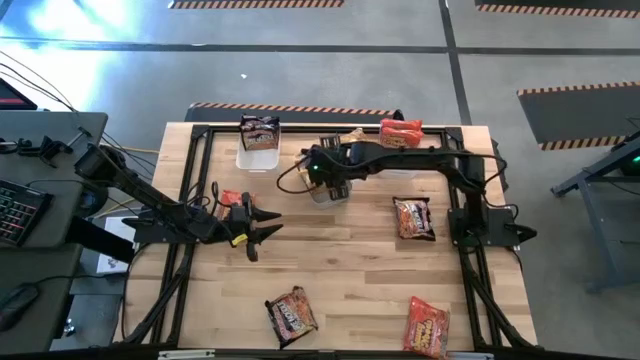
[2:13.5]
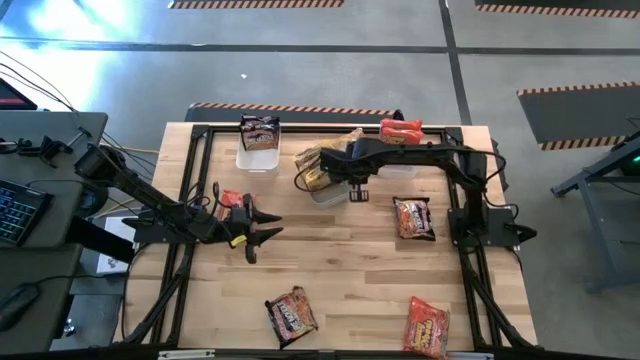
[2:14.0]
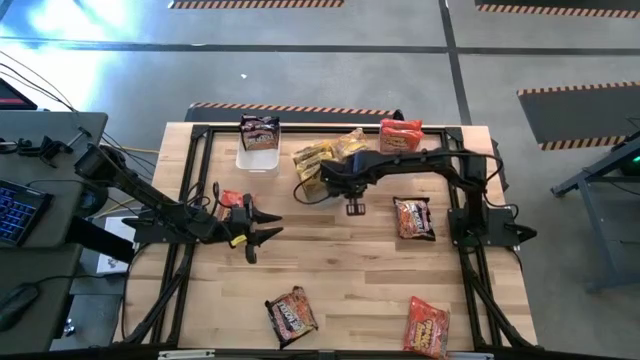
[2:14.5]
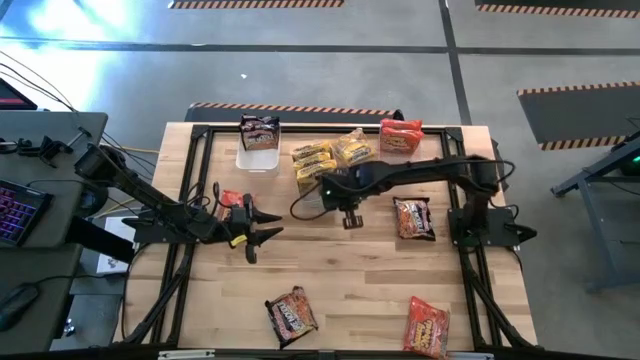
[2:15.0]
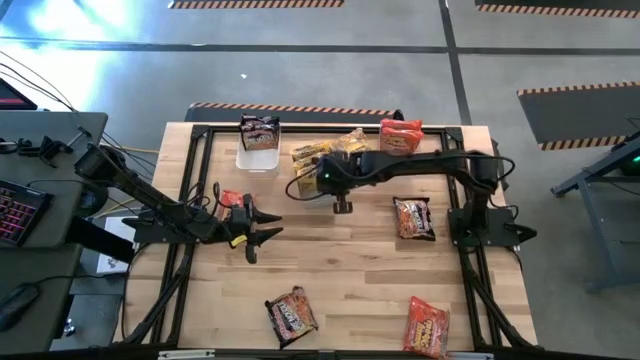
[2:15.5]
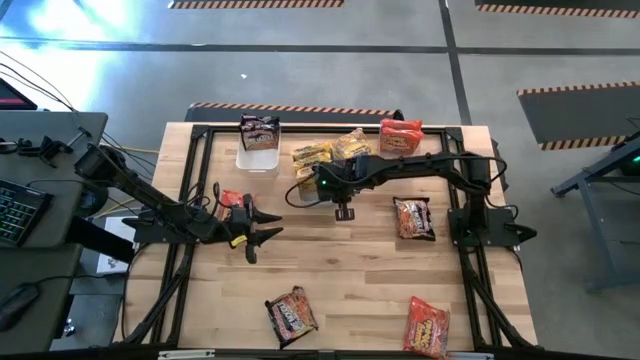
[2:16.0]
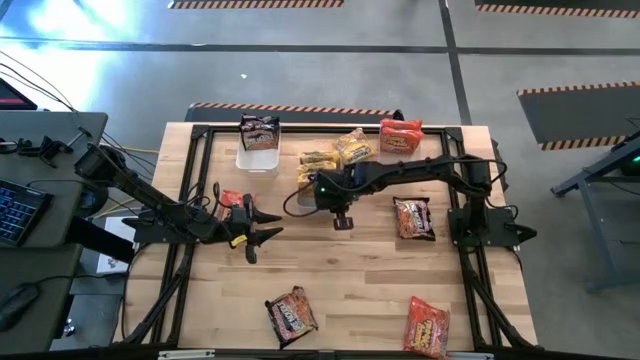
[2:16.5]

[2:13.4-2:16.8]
Task: Sort Maruchan noodles
Adjust the gray bin

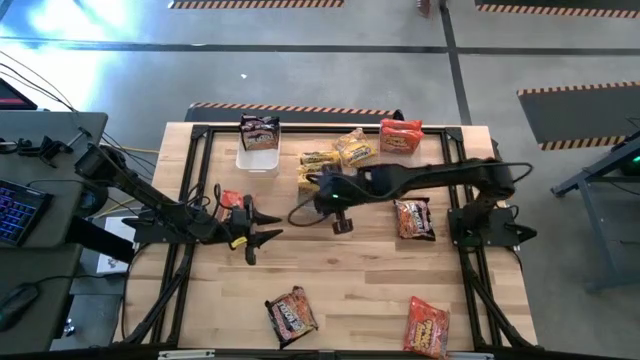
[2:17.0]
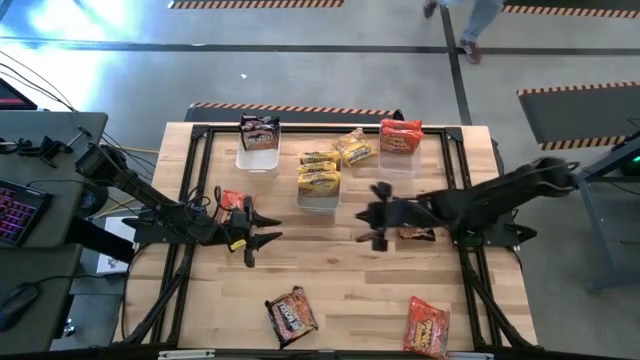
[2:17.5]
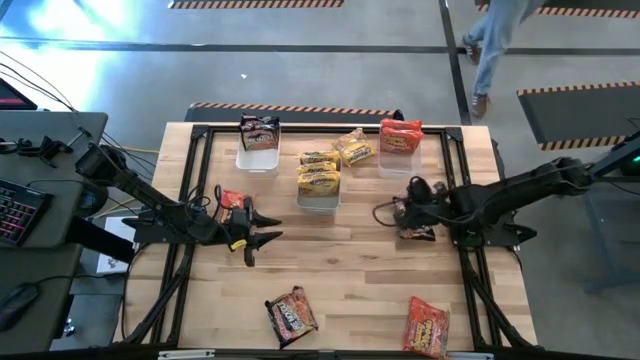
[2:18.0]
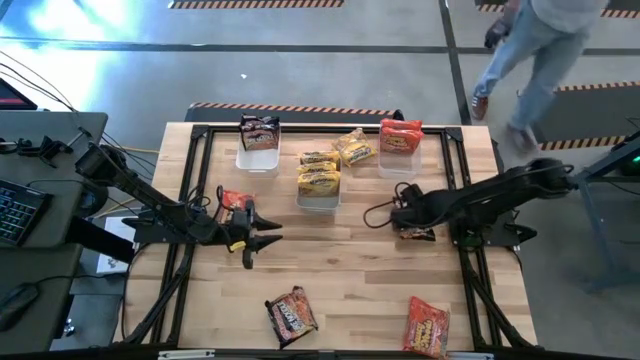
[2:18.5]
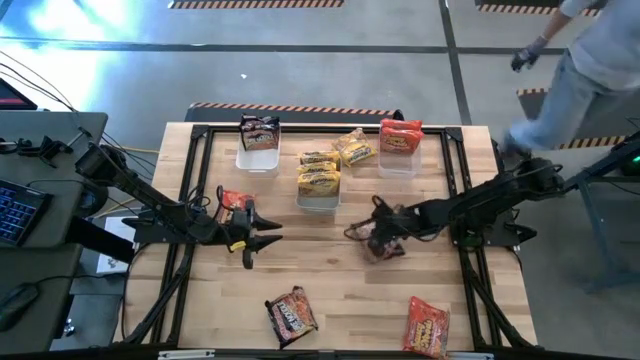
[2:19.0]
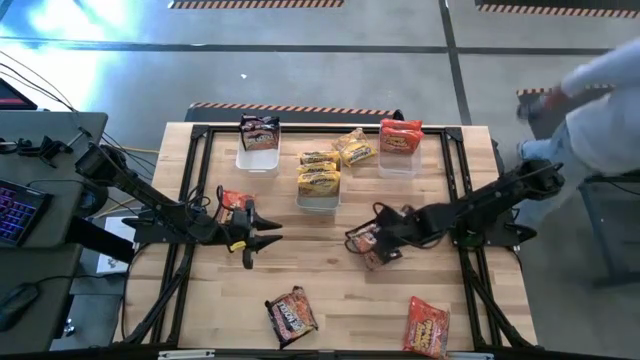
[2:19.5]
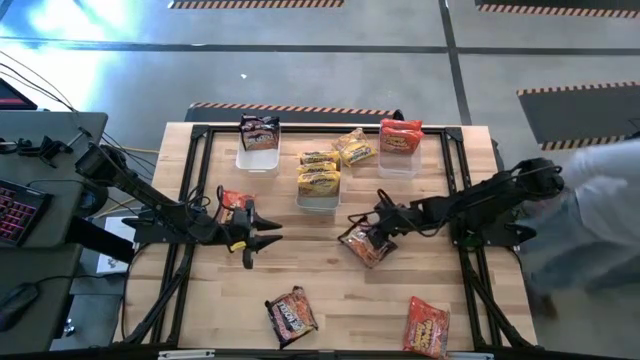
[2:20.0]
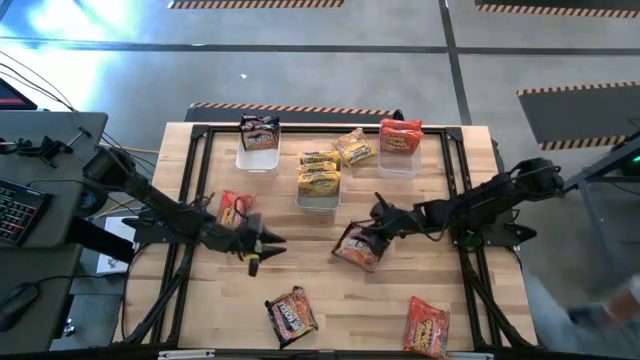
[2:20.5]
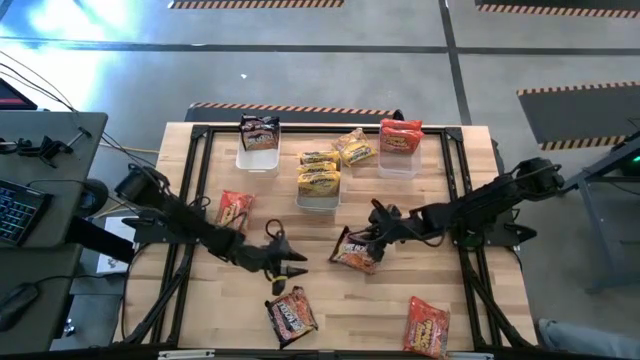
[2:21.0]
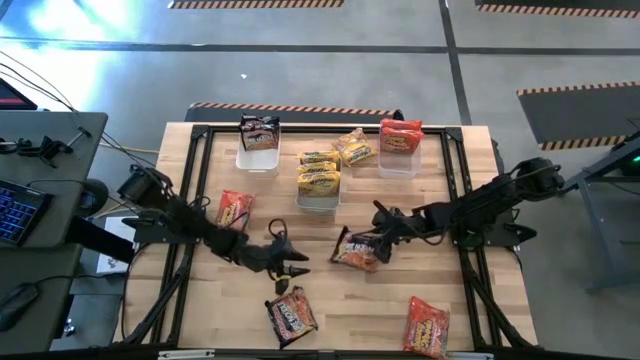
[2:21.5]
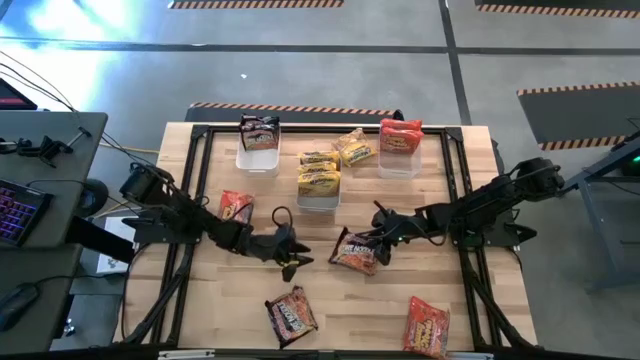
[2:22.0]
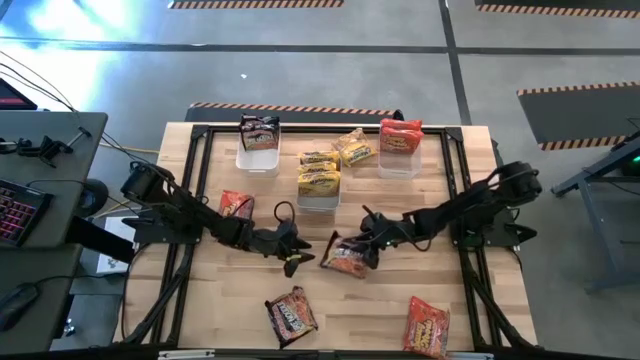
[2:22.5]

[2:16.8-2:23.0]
Put the top black noodle pack into the white bin

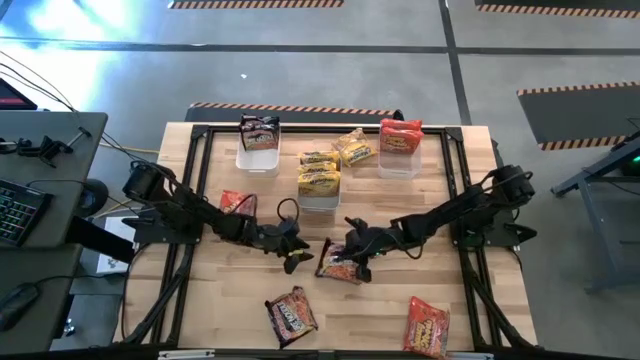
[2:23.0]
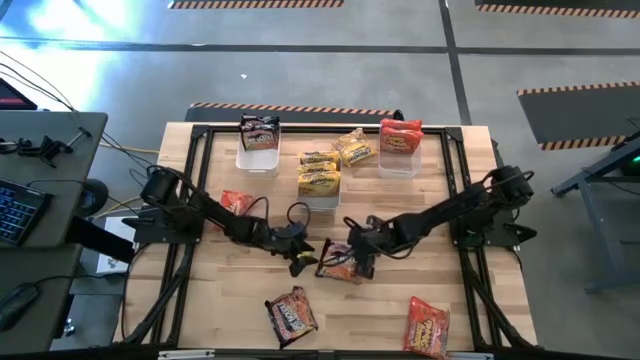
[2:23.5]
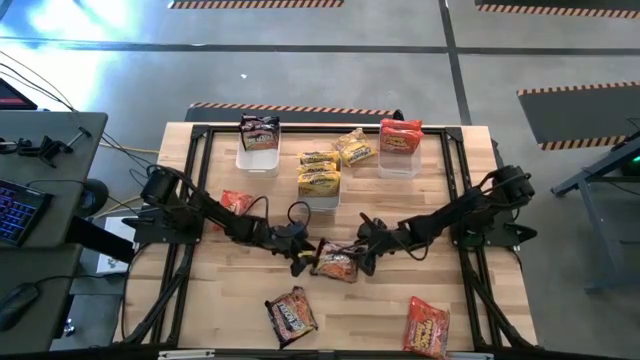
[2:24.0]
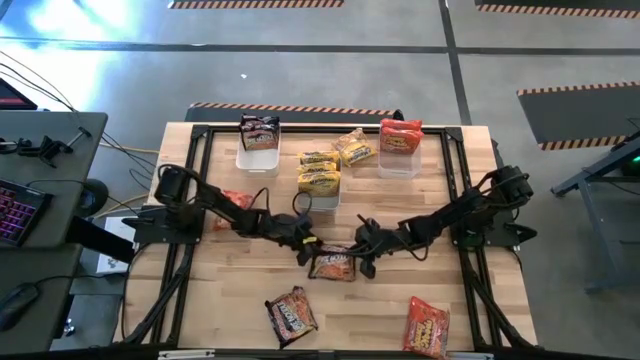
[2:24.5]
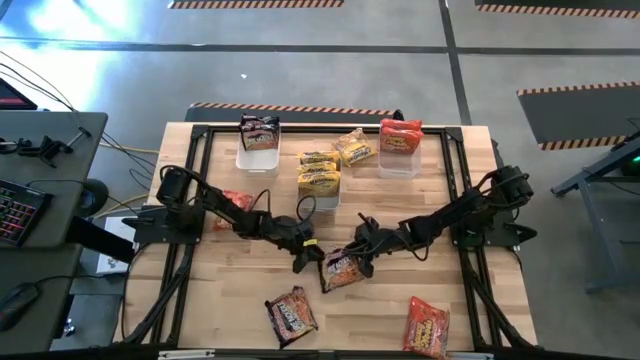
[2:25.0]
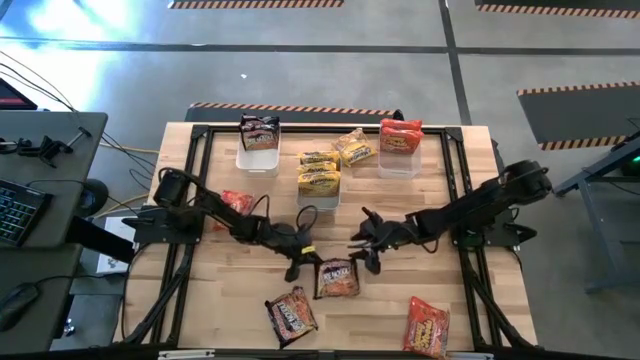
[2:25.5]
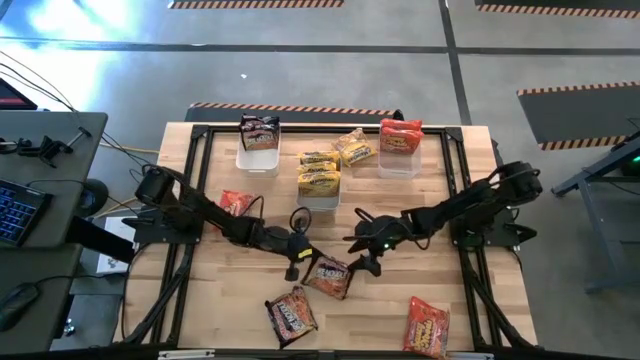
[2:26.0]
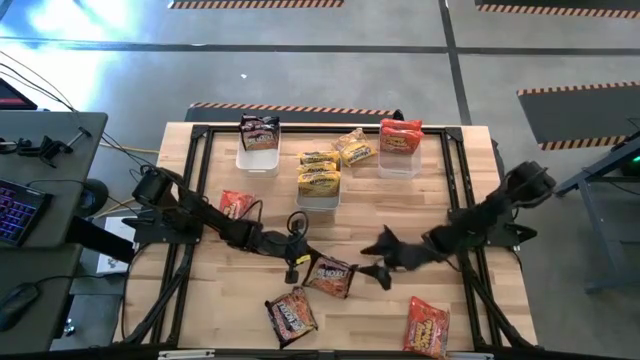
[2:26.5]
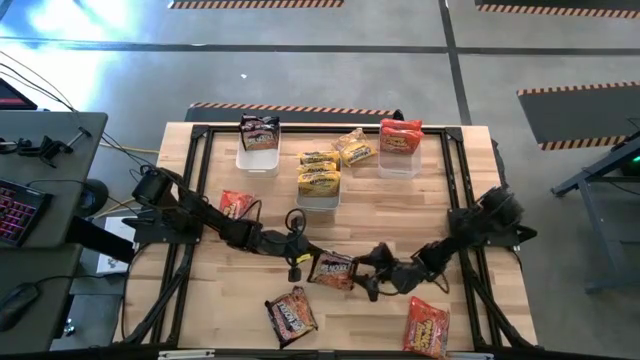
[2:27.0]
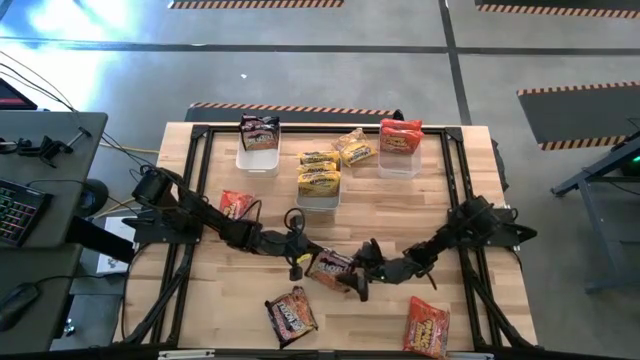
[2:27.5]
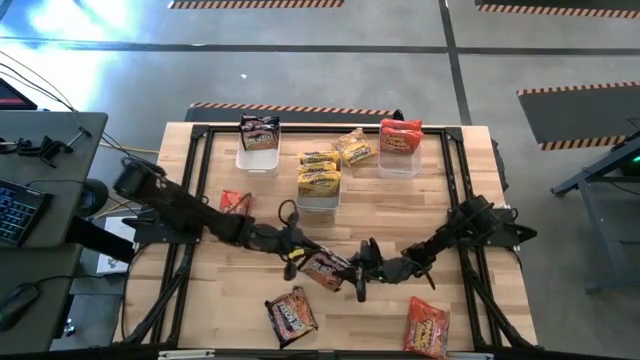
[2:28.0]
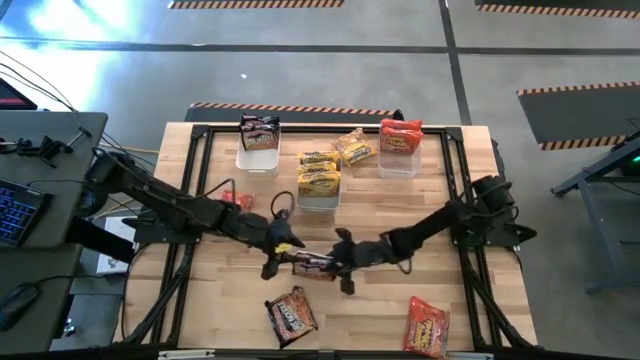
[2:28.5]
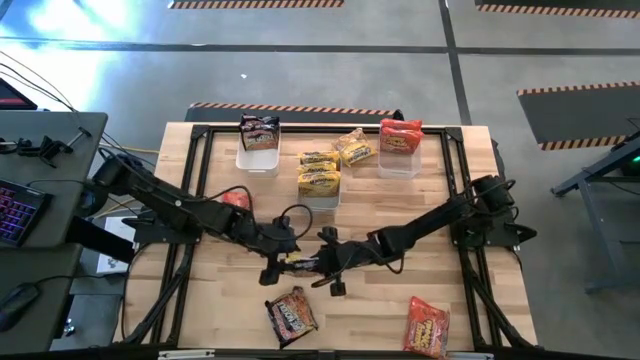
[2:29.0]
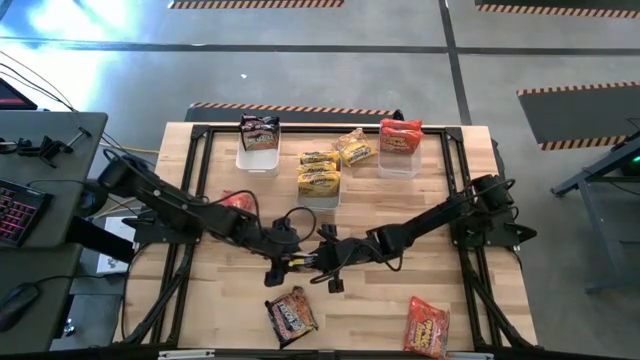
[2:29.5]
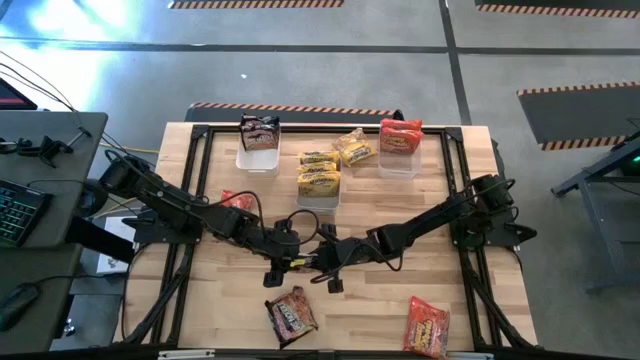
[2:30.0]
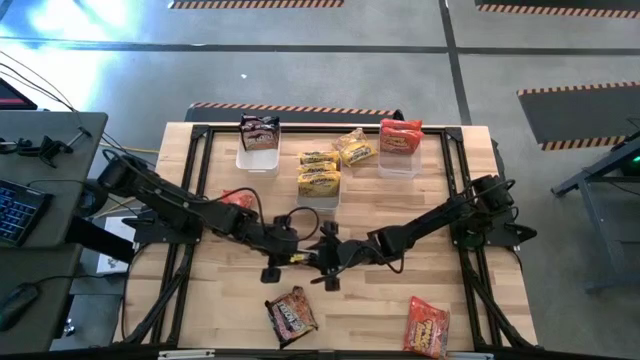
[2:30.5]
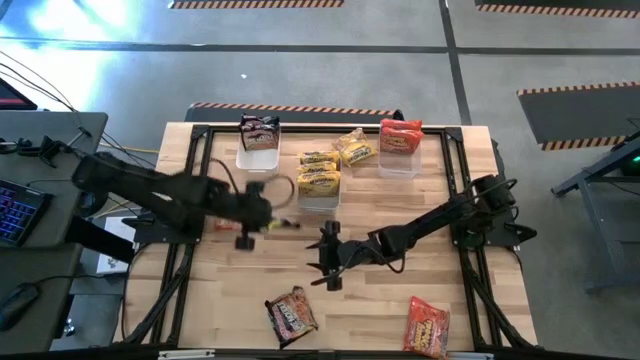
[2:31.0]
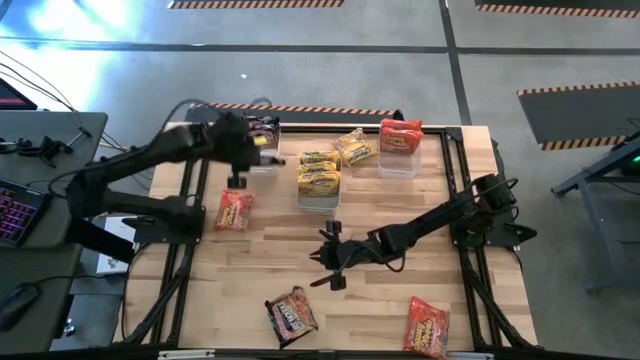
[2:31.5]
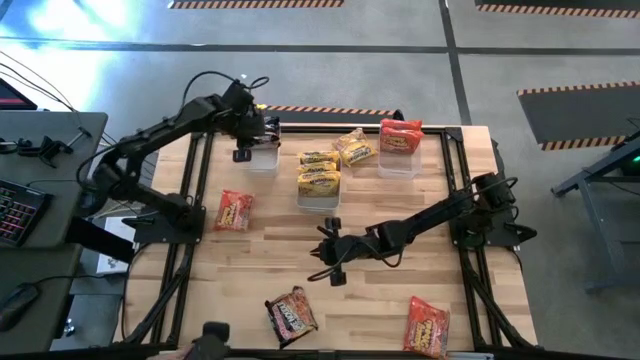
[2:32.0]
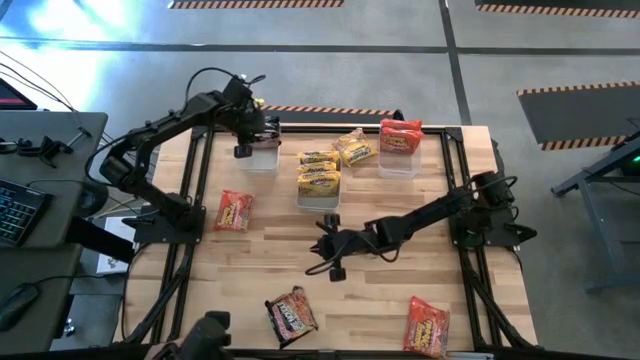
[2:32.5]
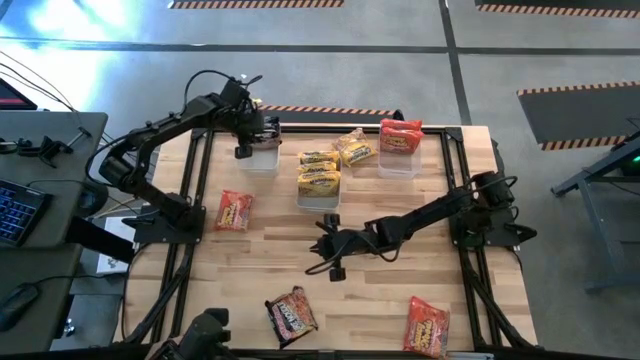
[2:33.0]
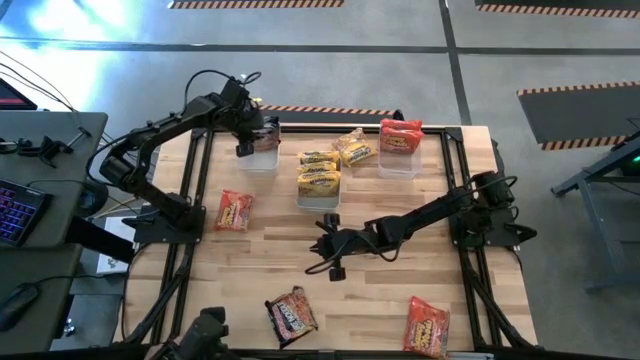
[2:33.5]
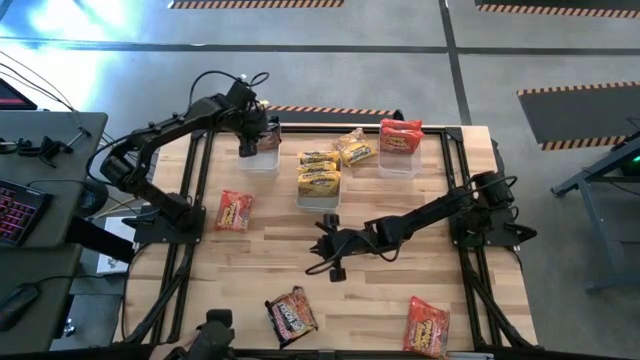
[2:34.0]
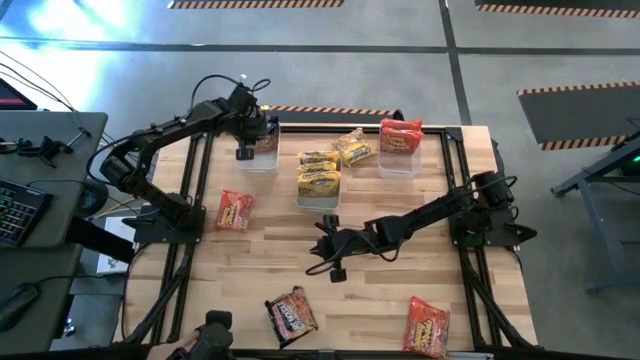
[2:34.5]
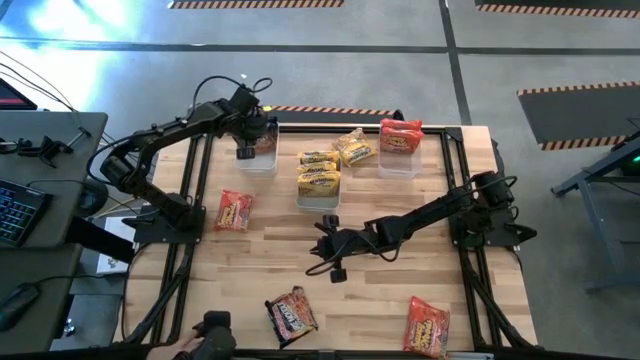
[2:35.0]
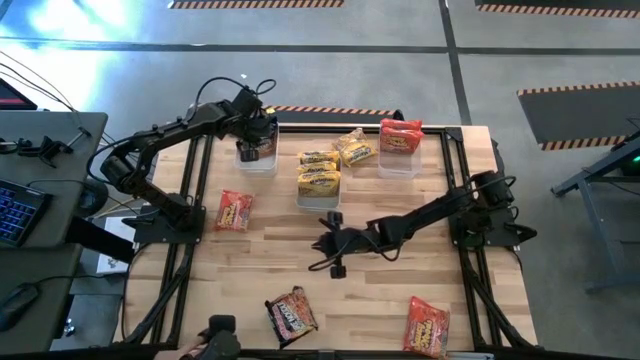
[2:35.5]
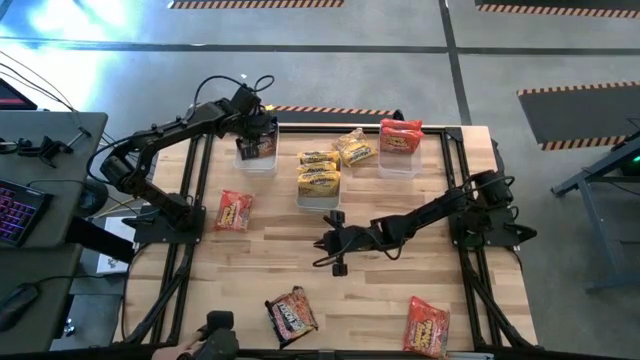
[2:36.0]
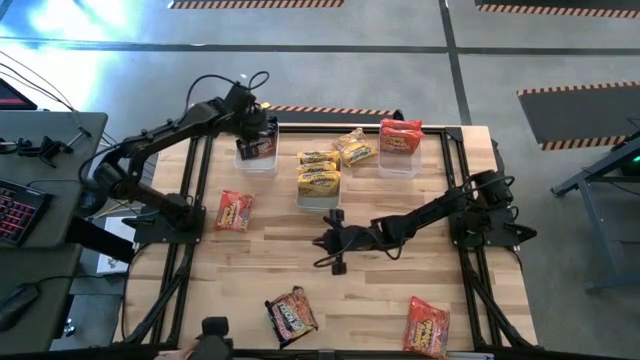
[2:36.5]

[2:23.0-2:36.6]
Put the top black noodle pack into the white bin
